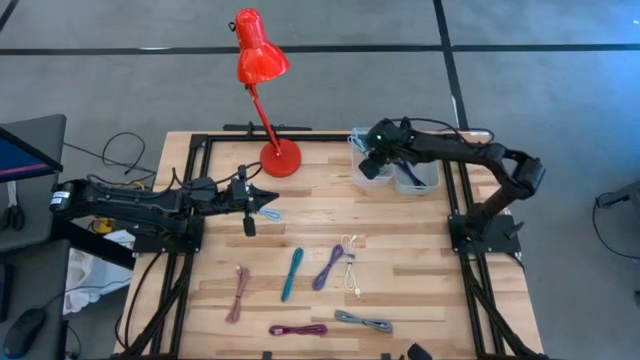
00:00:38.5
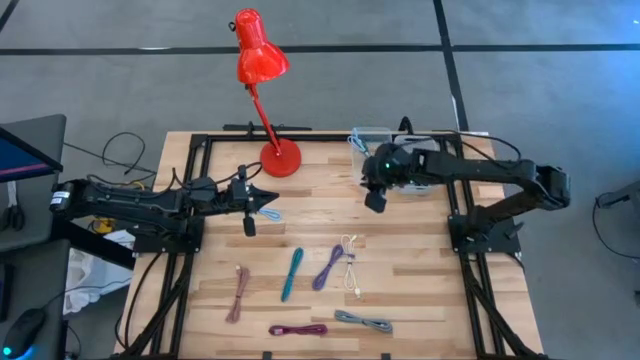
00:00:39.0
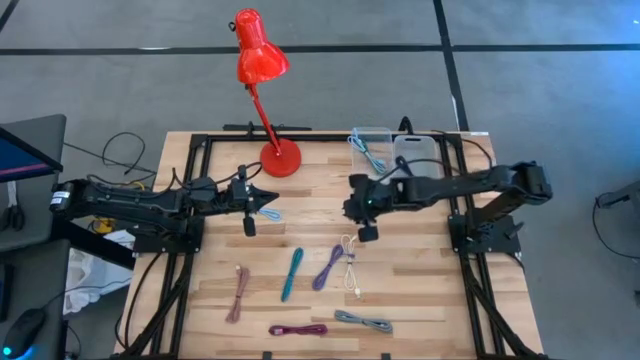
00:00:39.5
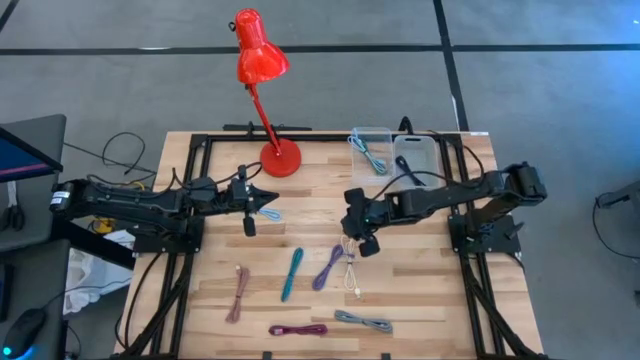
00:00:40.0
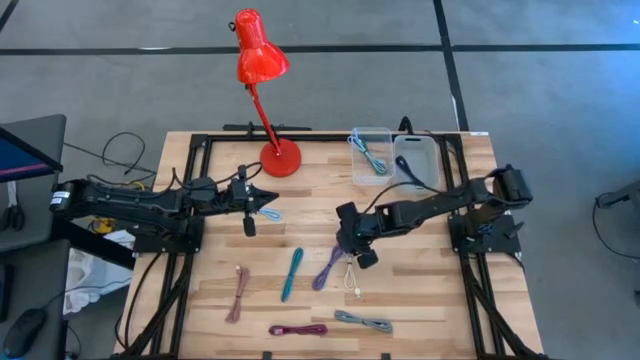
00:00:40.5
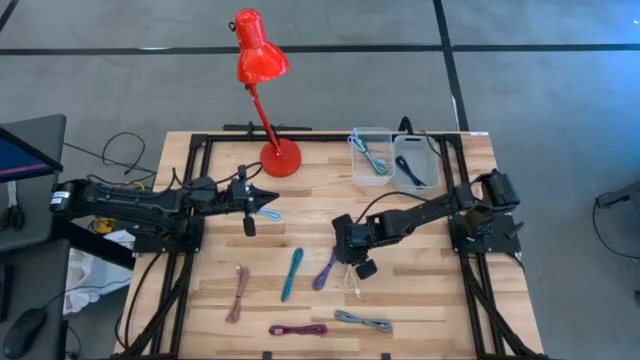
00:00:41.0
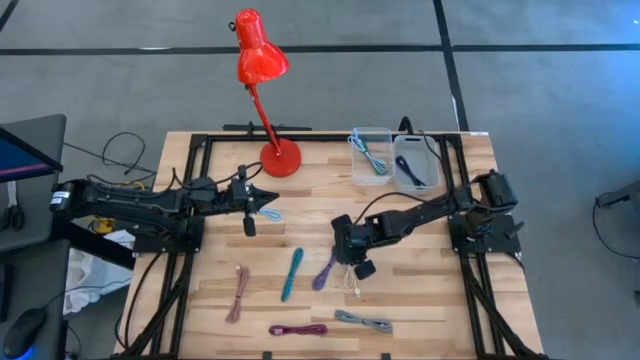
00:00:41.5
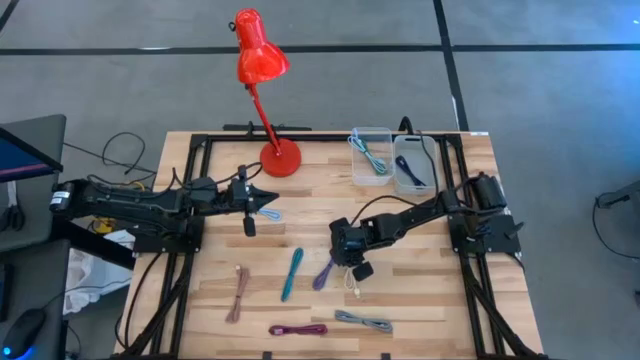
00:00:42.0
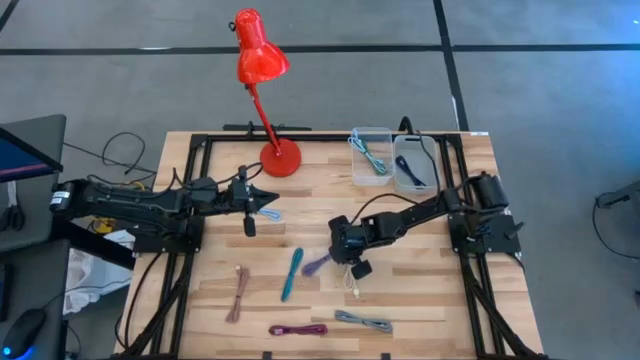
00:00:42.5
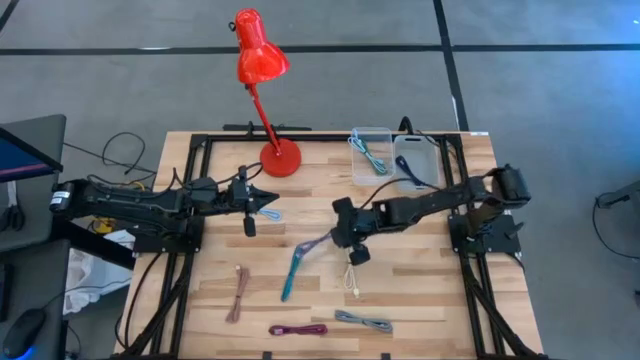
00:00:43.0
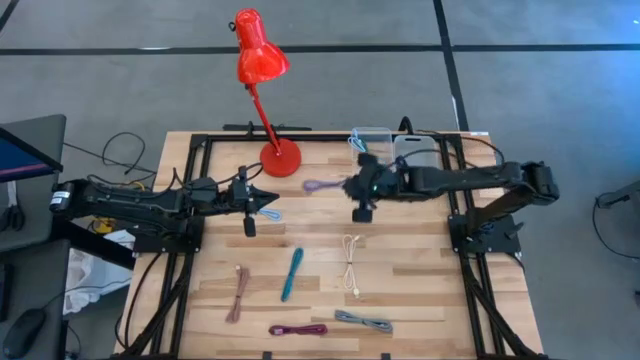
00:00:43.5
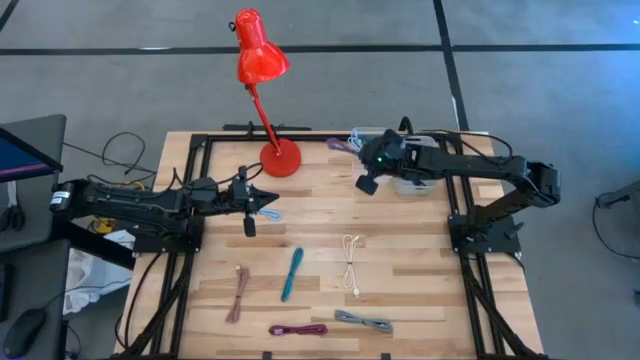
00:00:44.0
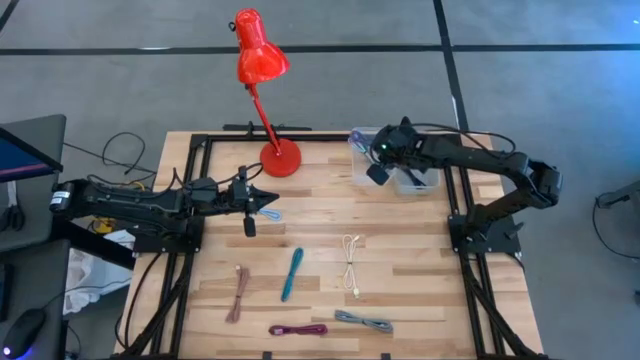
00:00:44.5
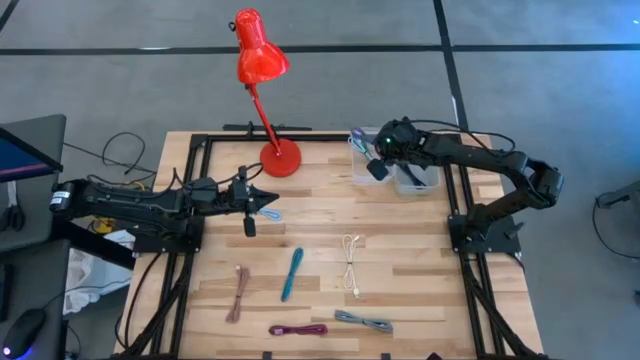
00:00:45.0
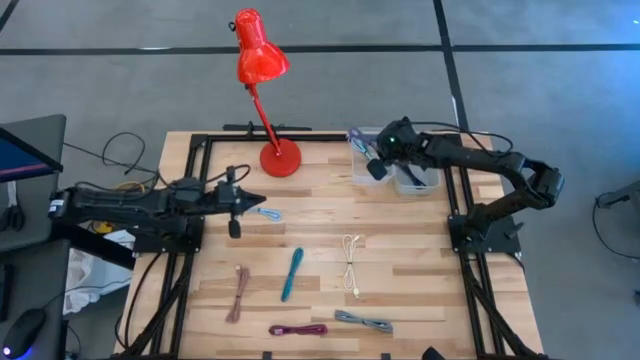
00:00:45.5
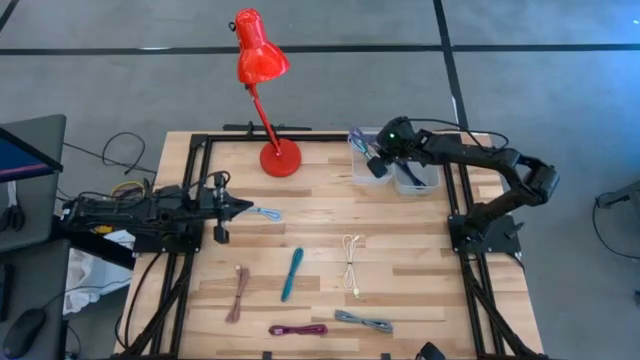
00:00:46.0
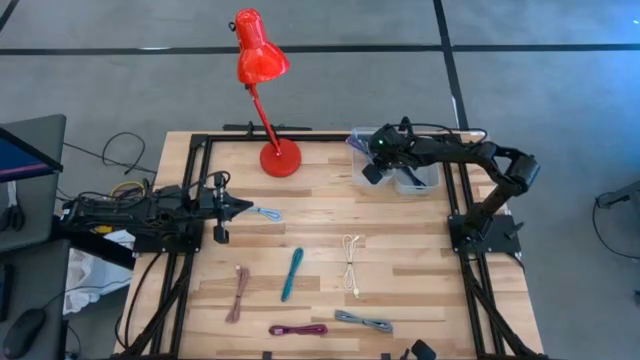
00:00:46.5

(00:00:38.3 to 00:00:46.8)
Task: Pick & Place USB Port
Put the violet charger cable into the transparent bin

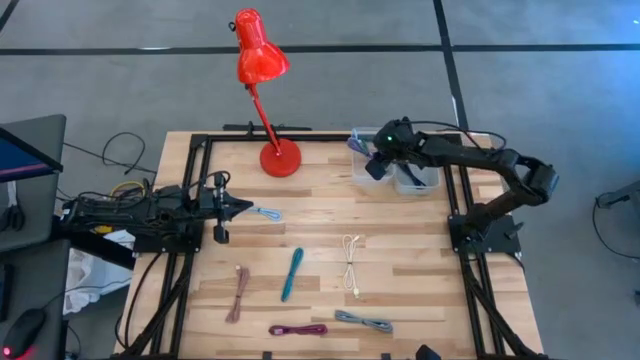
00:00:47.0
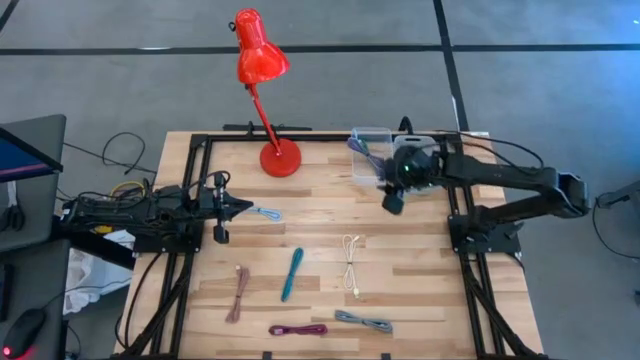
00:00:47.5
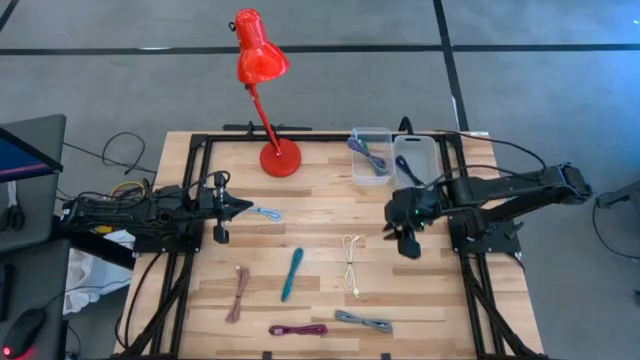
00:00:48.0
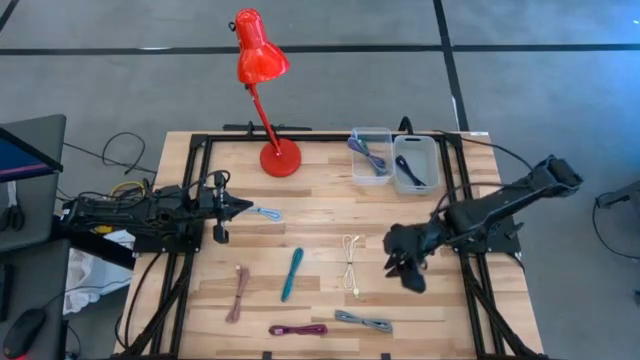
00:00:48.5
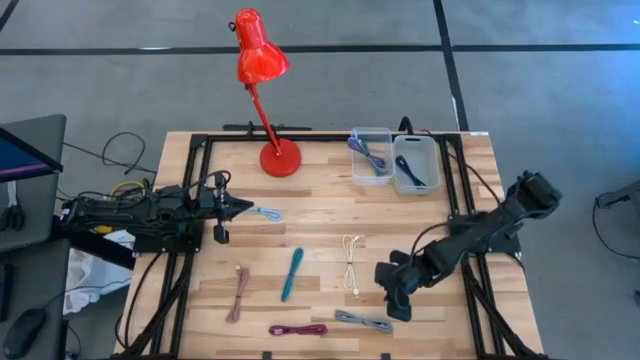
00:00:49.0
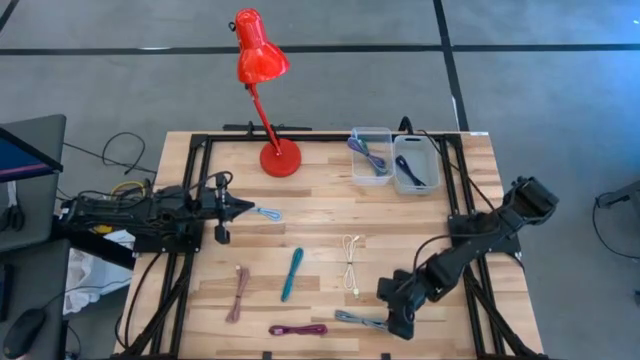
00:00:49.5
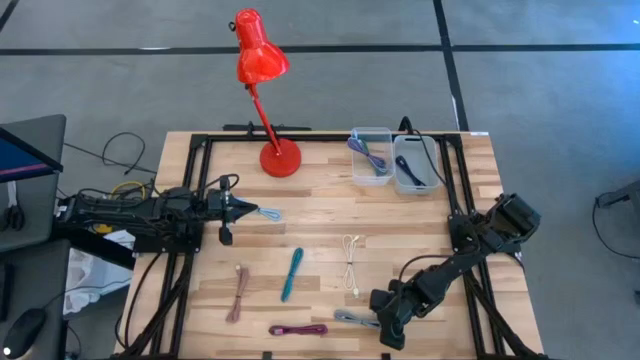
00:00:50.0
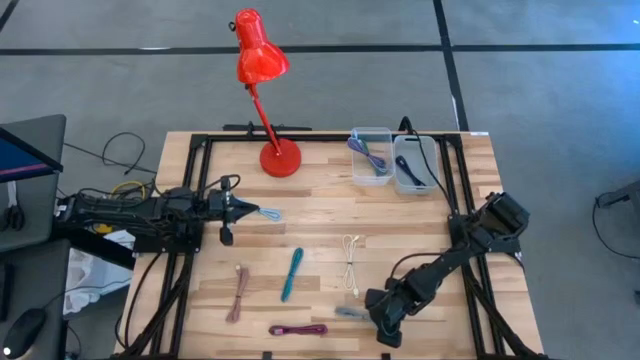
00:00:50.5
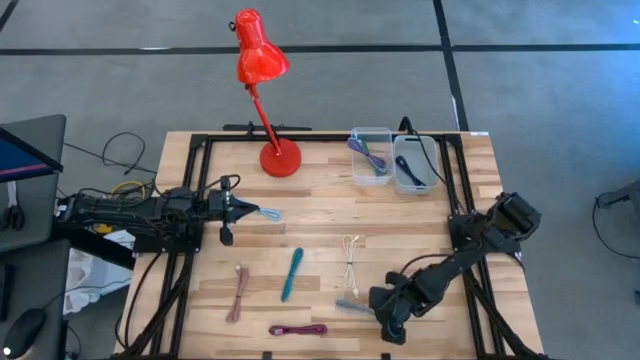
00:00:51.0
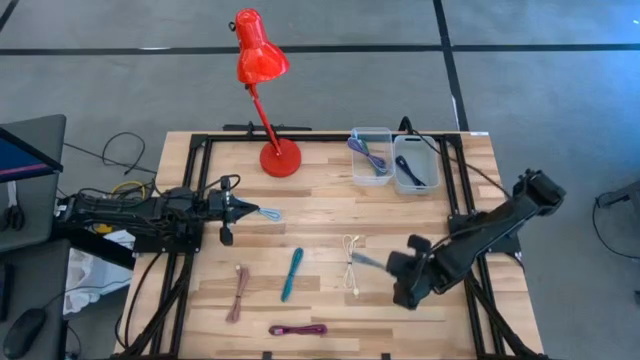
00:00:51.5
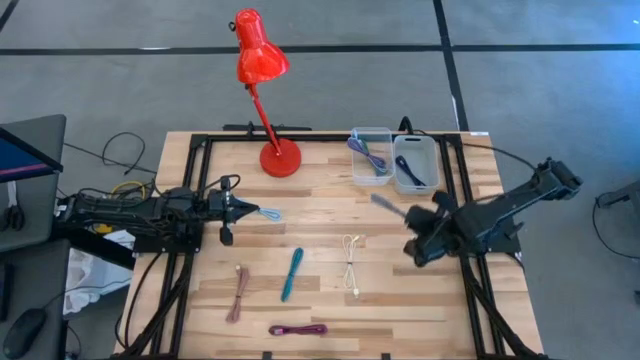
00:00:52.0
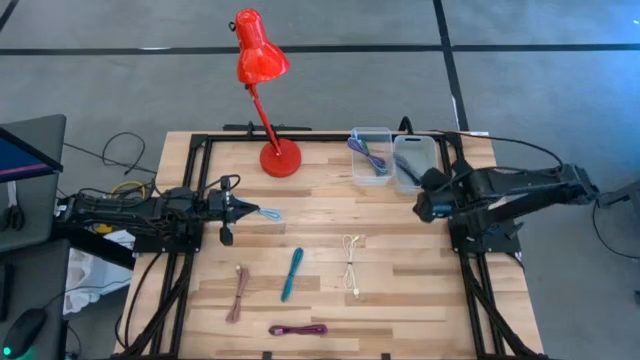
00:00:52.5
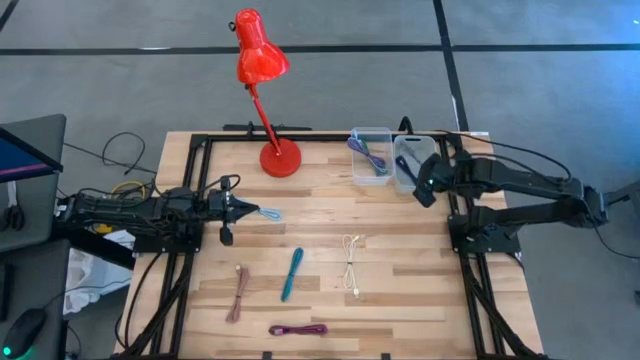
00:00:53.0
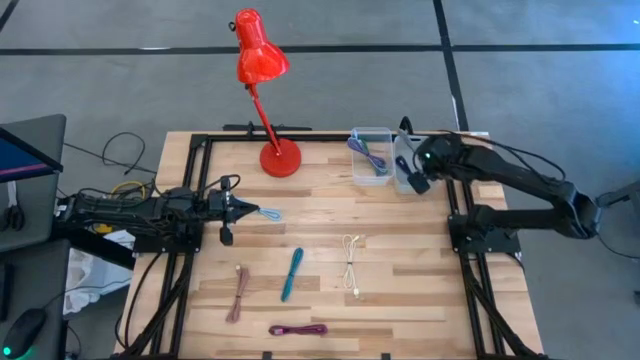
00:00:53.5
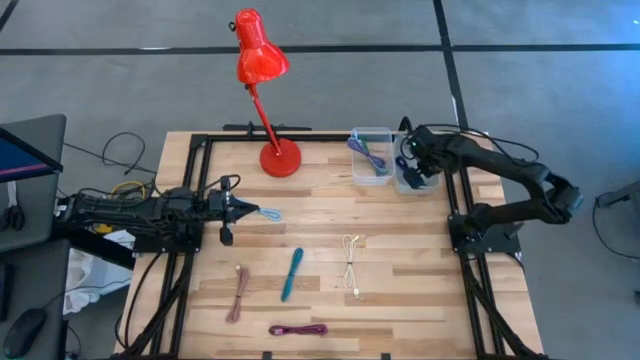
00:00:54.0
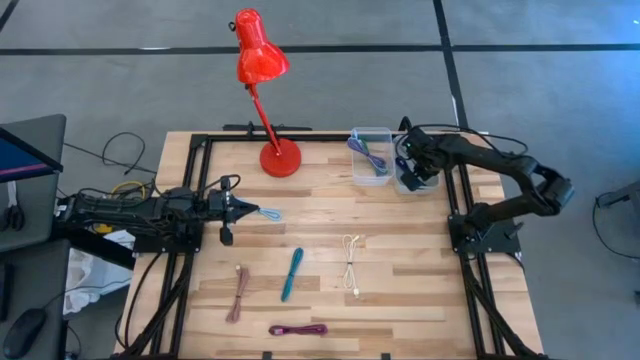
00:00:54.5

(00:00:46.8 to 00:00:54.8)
Put the black and white charger cable into the gray bin

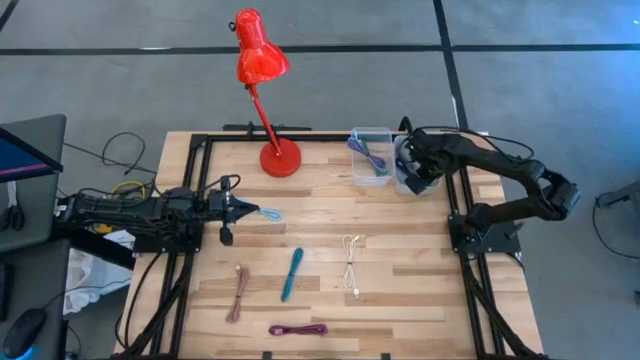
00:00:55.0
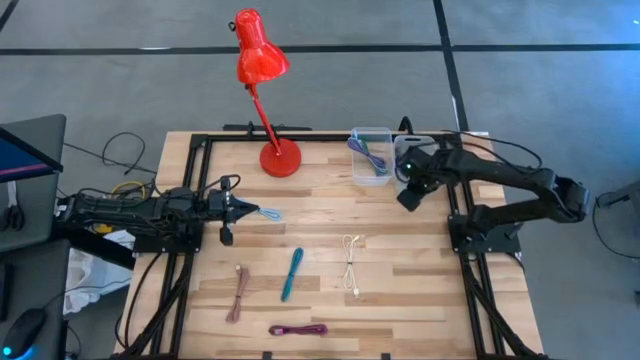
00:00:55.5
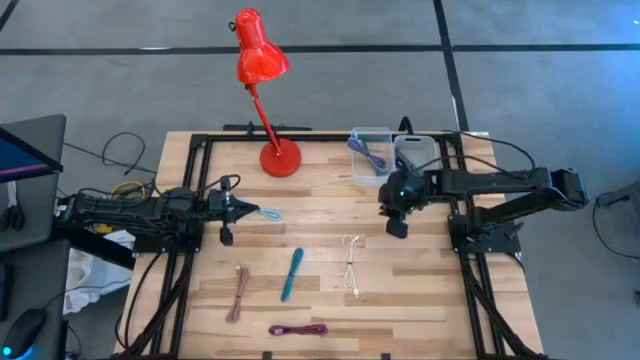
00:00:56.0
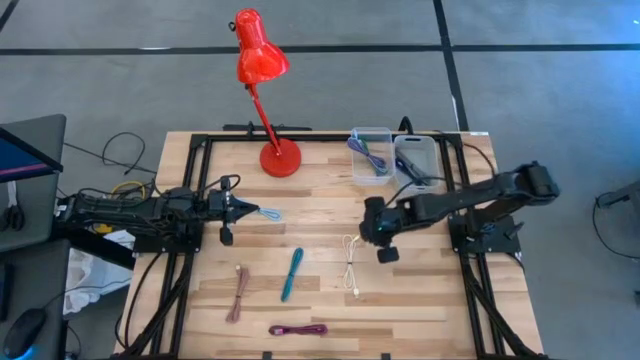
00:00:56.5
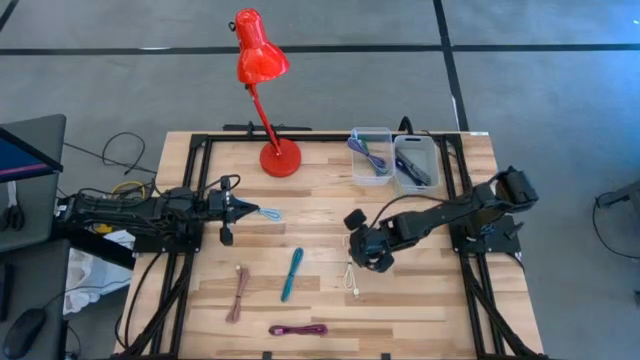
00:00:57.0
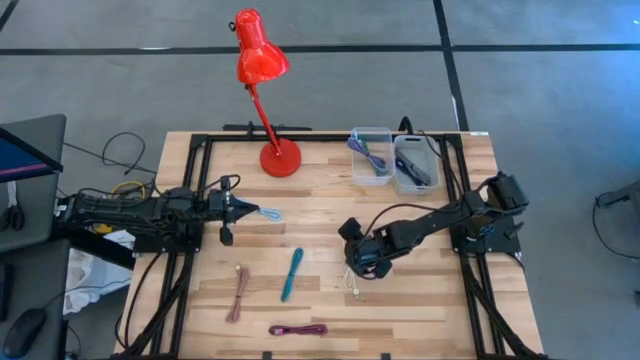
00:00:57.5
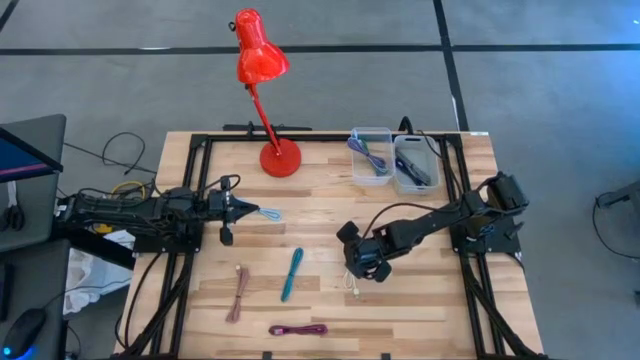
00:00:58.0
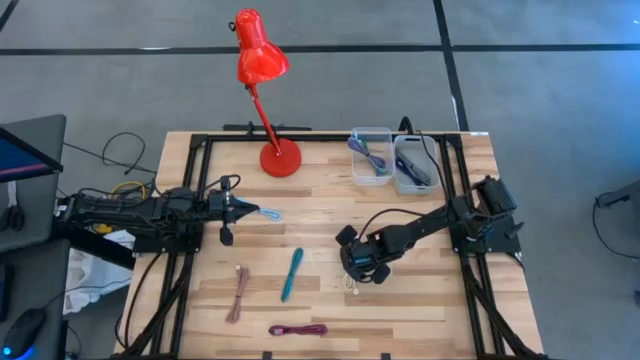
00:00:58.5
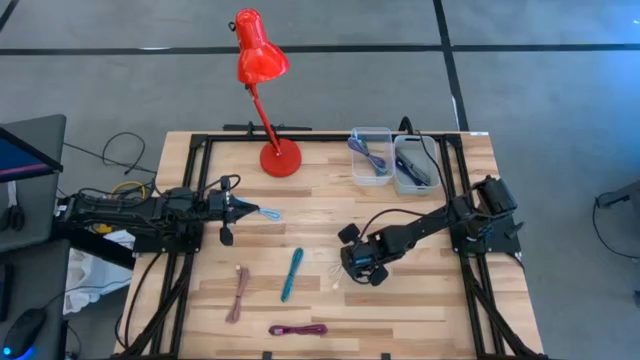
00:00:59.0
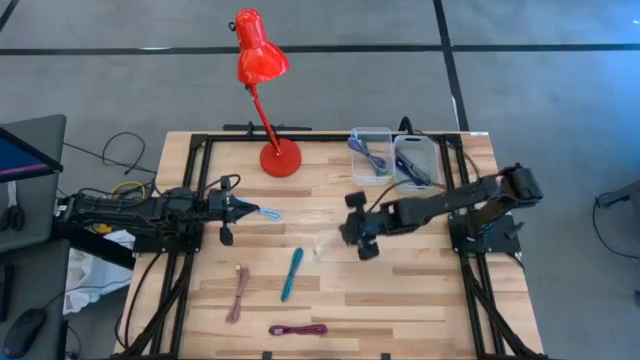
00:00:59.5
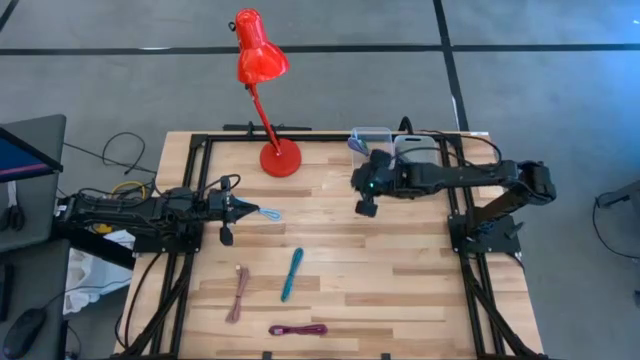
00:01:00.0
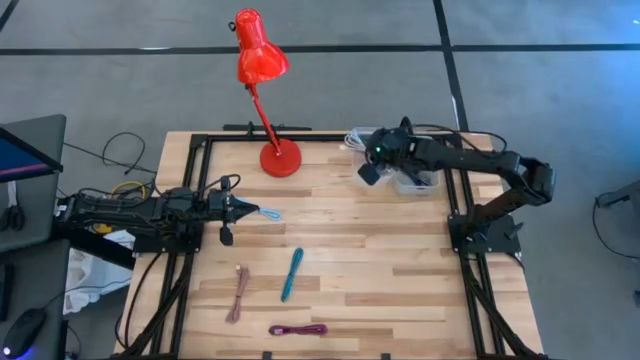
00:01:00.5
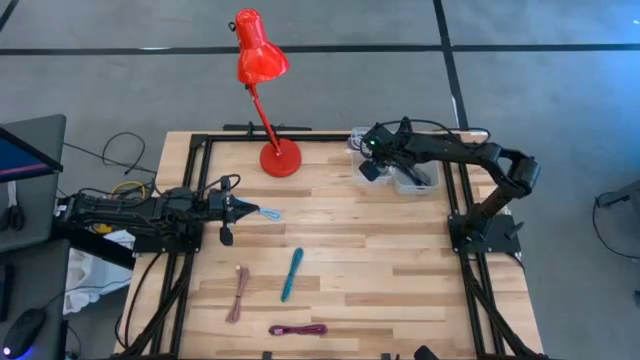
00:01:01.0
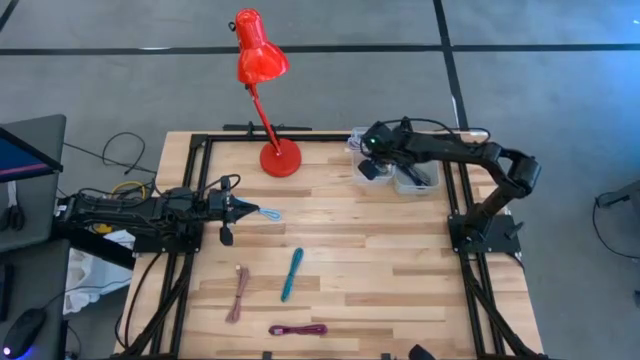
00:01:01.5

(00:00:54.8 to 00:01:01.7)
Put the white charger cable into the transparent bin
